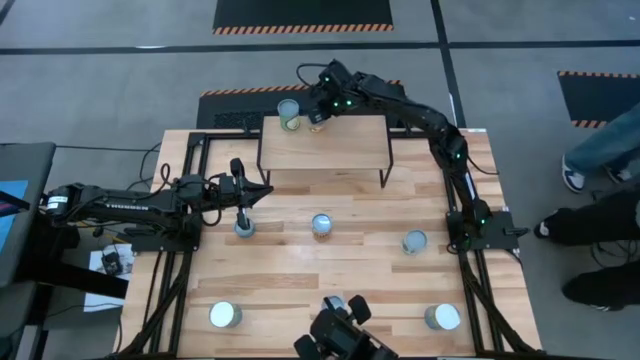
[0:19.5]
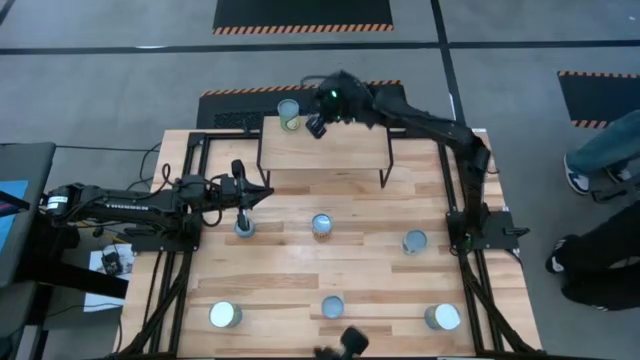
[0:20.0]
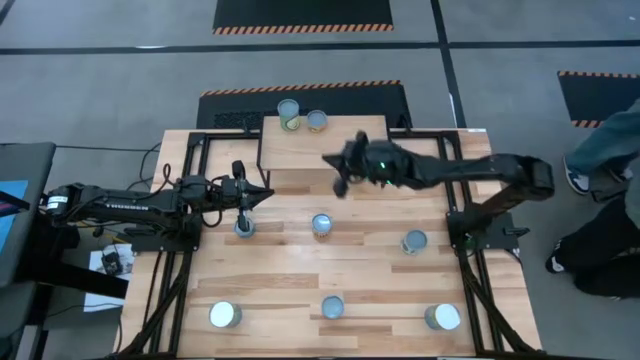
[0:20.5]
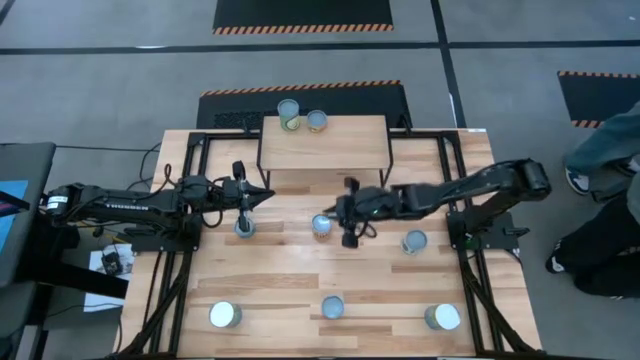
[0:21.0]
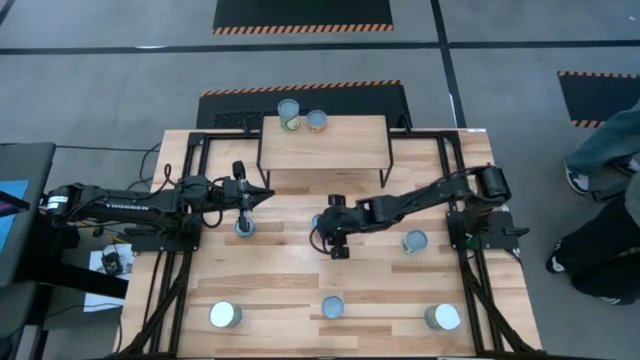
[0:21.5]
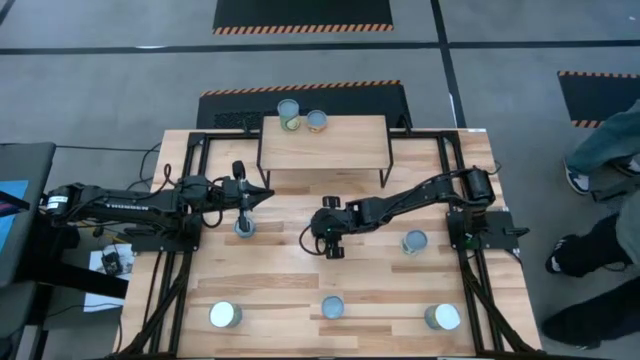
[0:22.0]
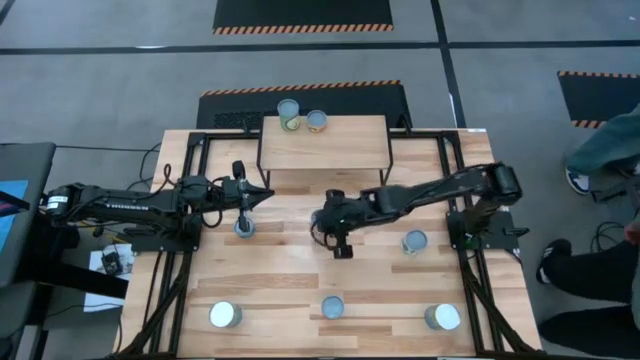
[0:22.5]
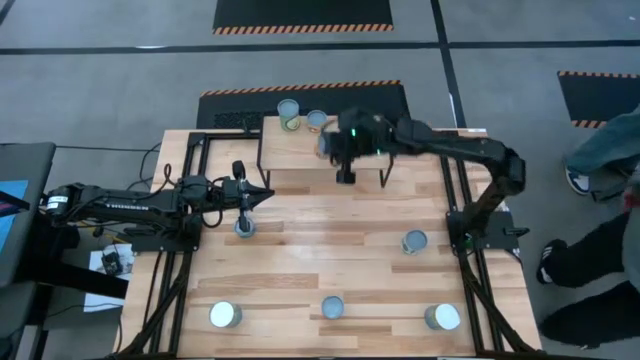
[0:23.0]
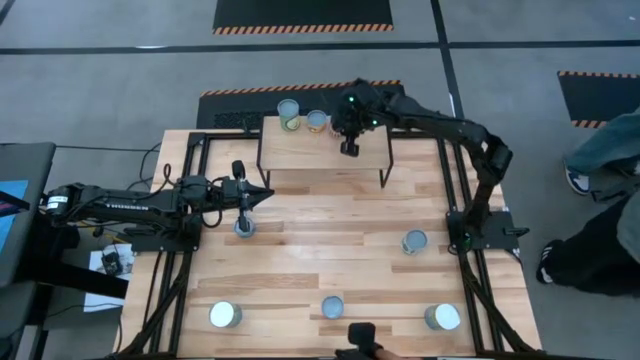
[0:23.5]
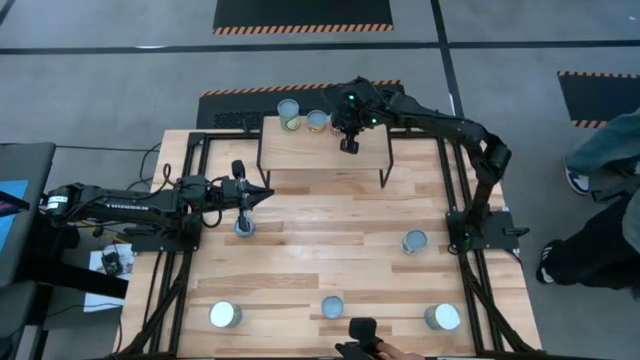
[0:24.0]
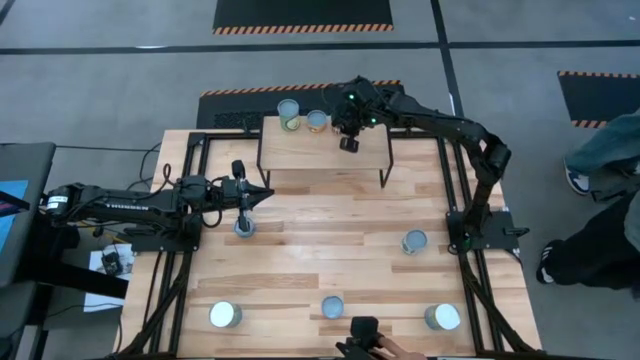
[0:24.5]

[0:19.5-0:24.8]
Task: Pick and place cans onto a shelf
Put the orange Black spicy can on the shelf

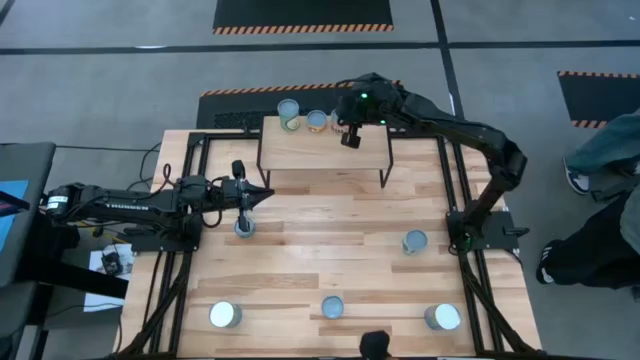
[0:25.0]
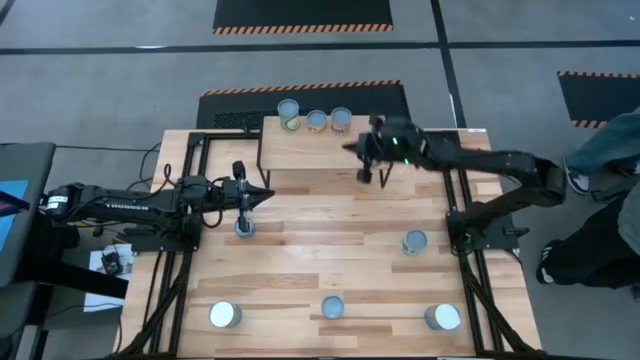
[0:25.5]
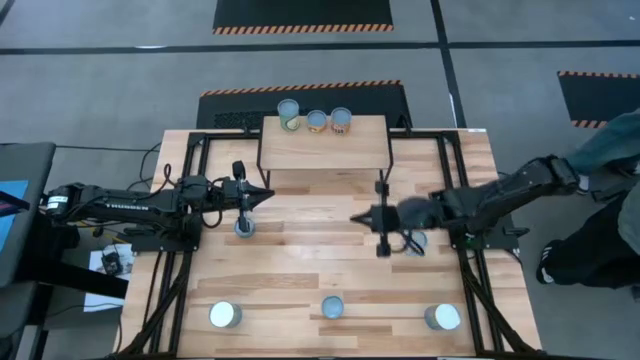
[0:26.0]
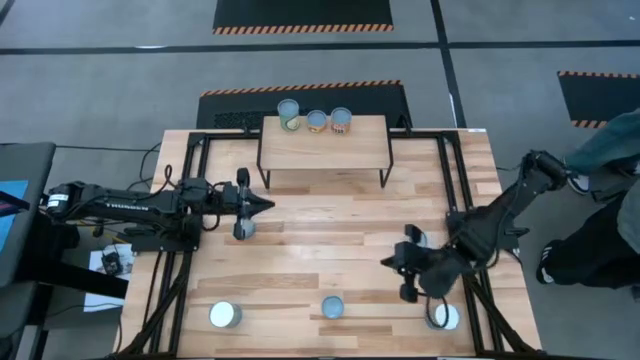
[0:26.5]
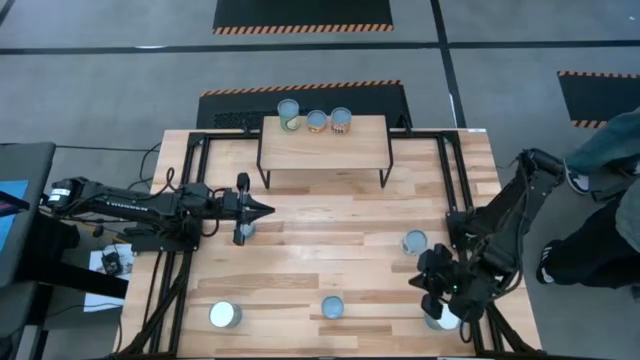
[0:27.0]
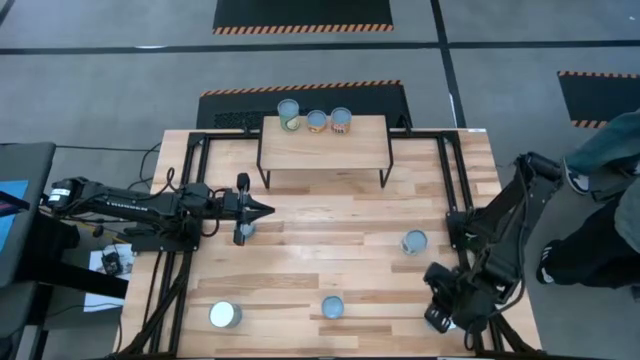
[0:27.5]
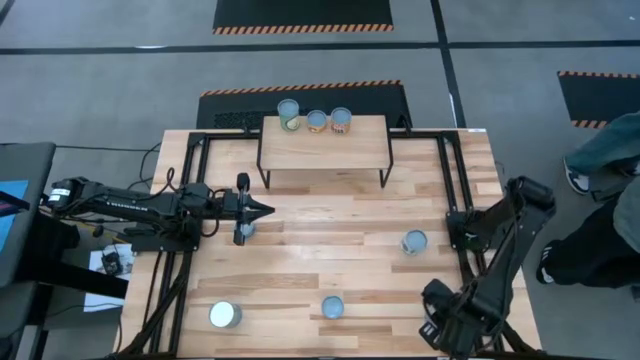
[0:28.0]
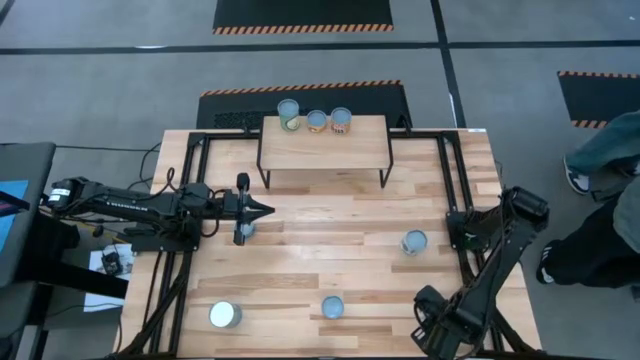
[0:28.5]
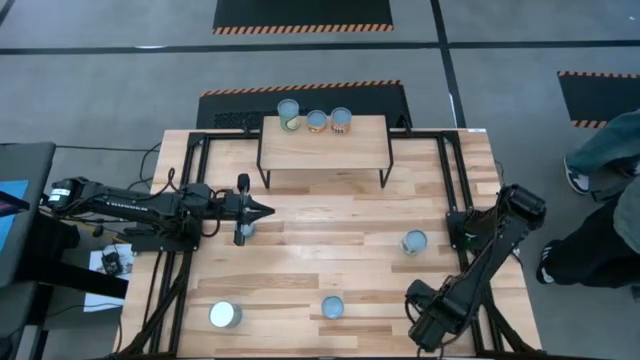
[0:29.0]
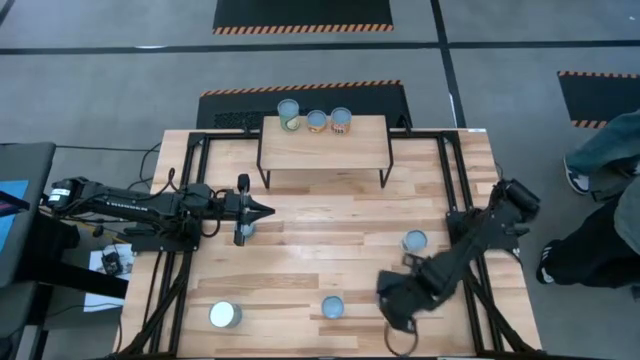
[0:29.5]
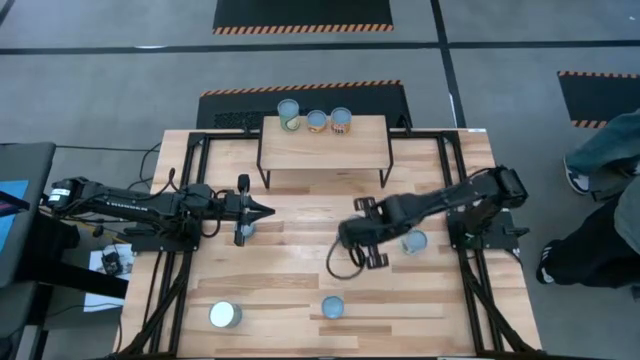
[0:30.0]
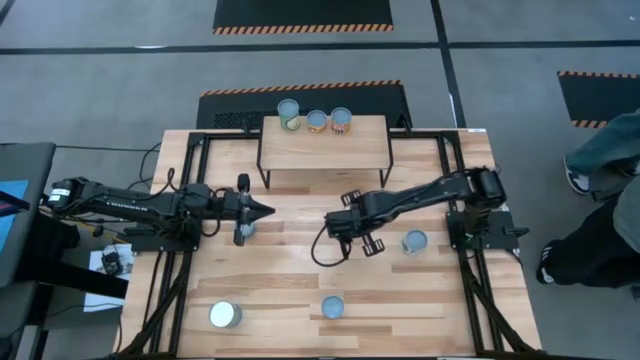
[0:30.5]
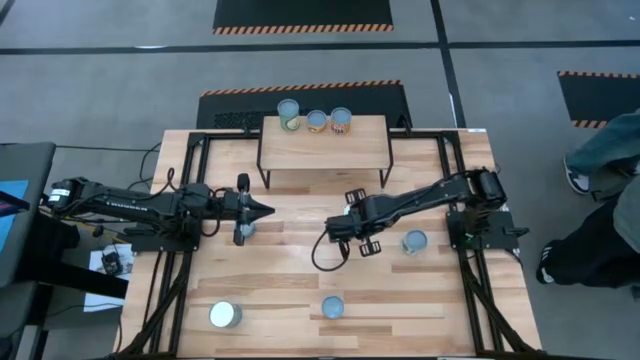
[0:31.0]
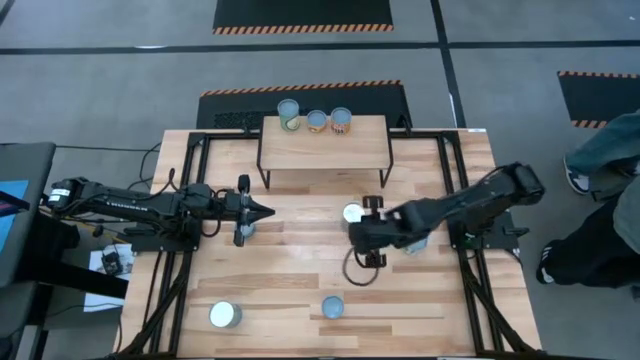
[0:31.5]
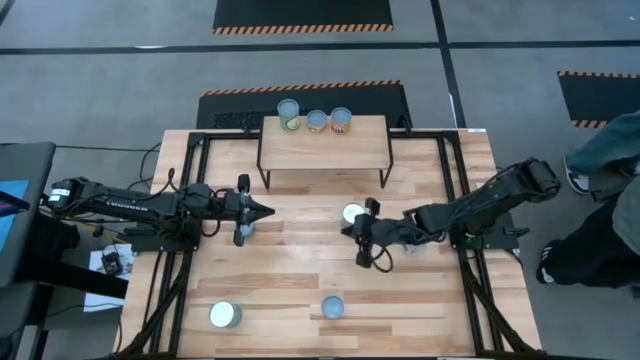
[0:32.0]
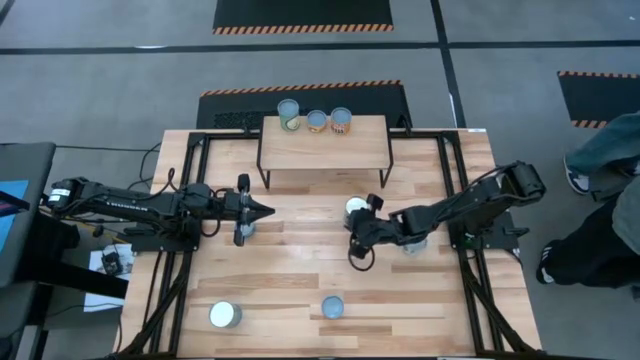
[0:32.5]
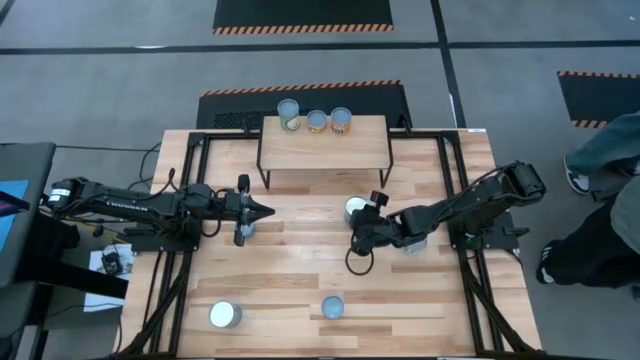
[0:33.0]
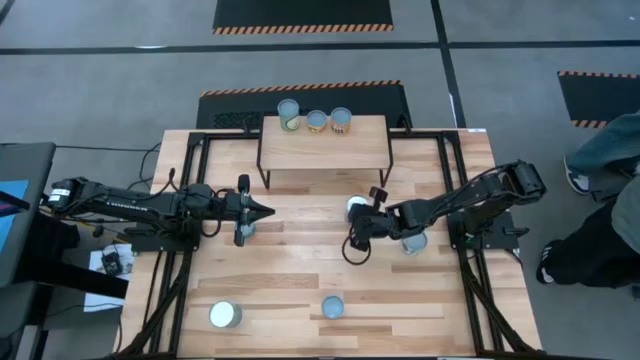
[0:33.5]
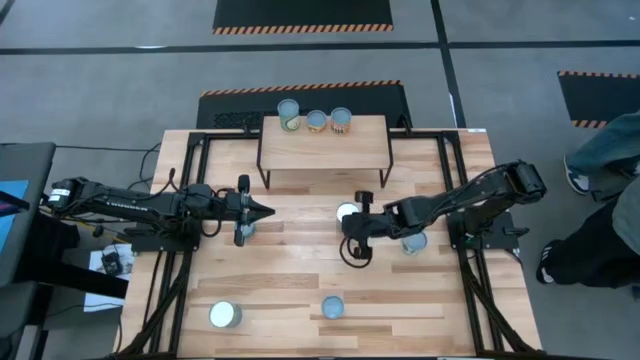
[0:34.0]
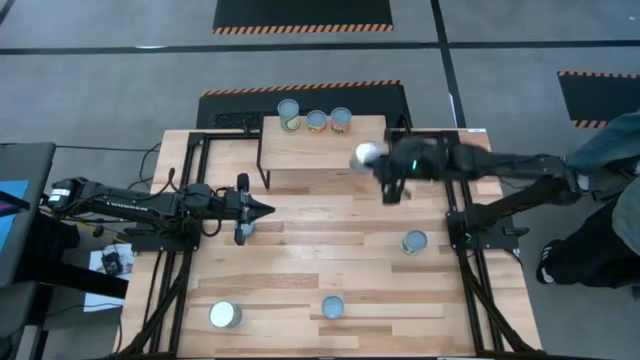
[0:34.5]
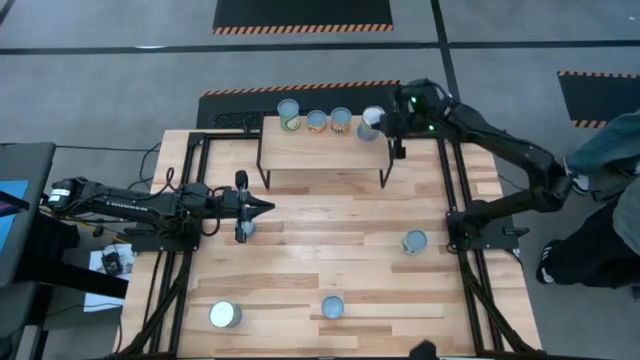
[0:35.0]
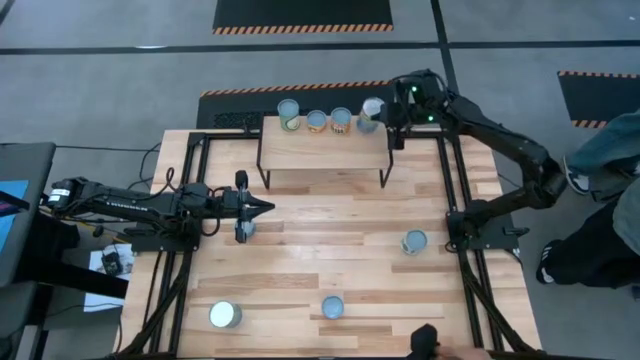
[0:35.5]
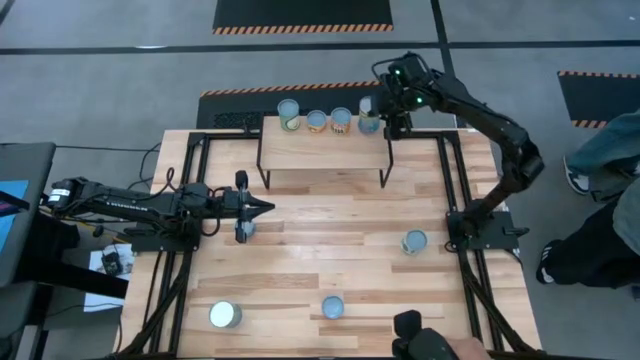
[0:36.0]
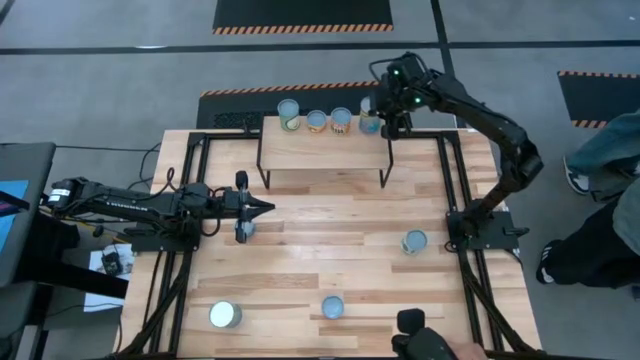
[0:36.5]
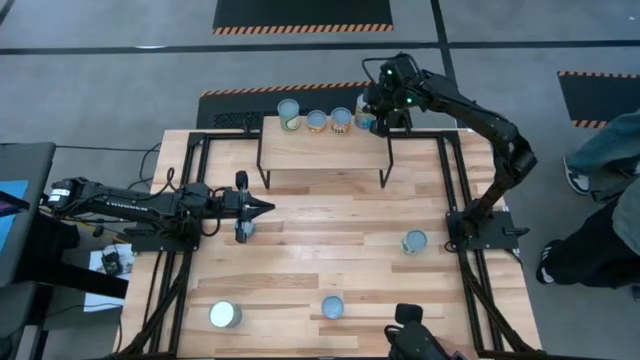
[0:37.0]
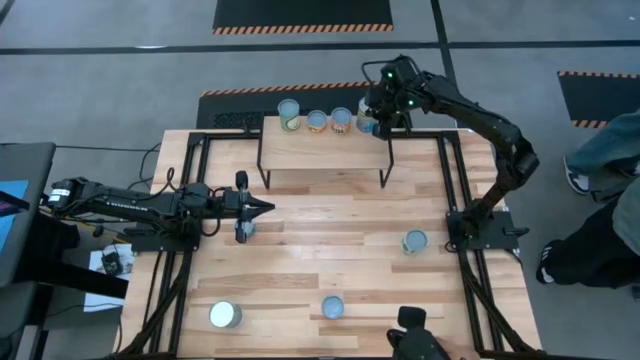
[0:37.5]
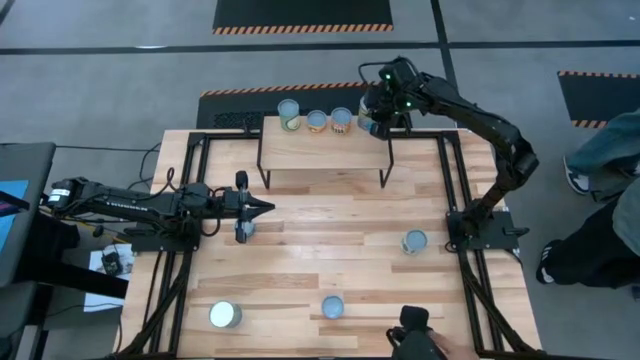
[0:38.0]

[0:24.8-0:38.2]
Put the blue cherries can on the shelf

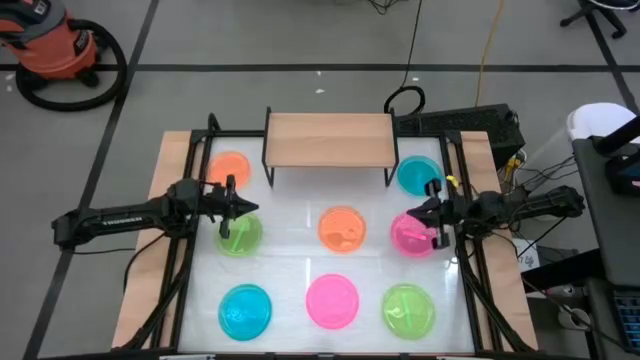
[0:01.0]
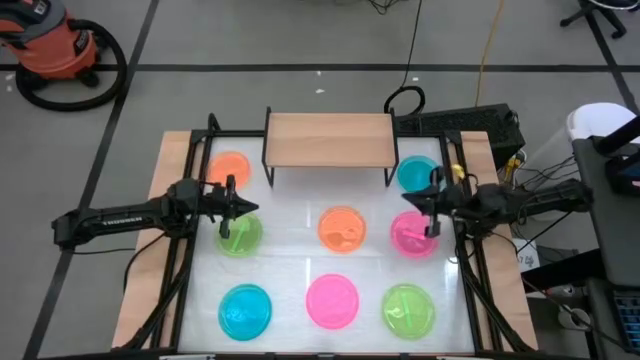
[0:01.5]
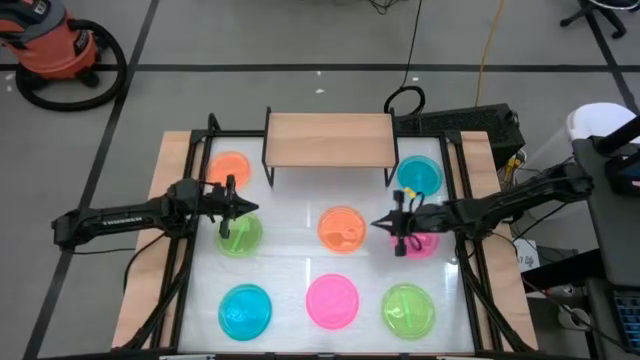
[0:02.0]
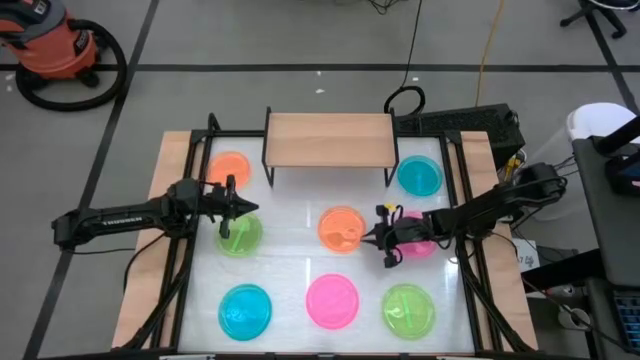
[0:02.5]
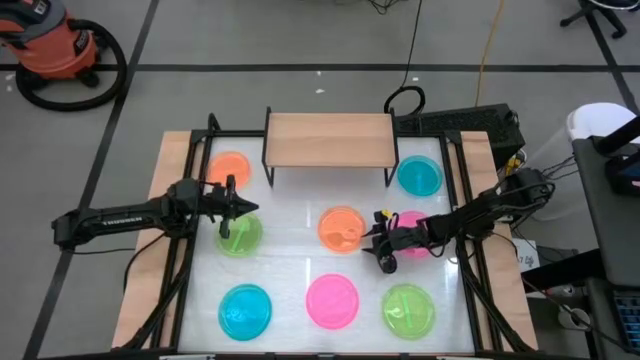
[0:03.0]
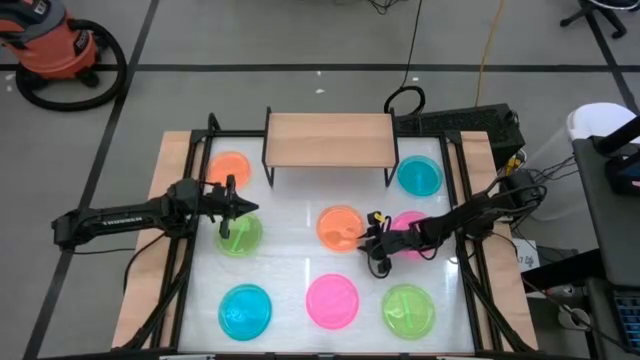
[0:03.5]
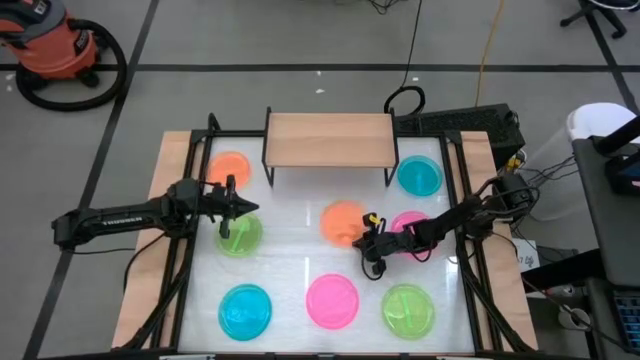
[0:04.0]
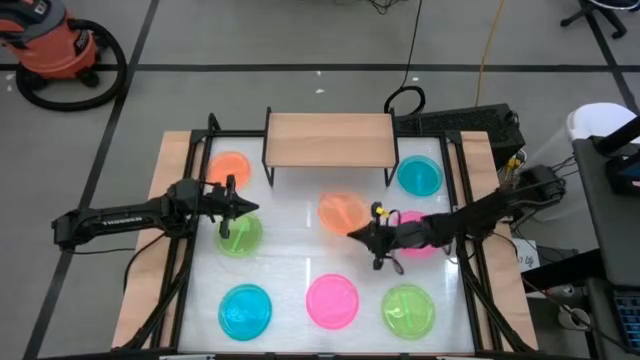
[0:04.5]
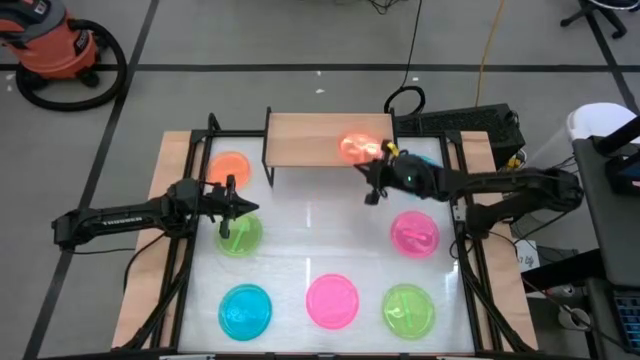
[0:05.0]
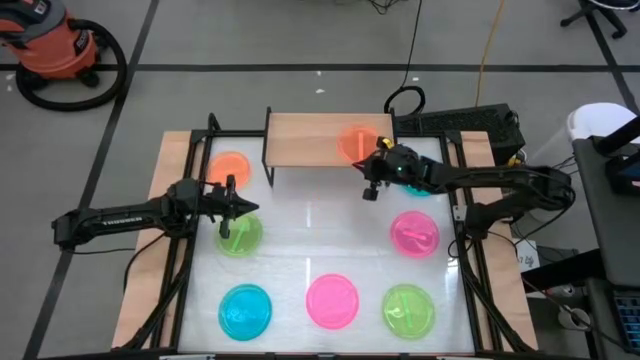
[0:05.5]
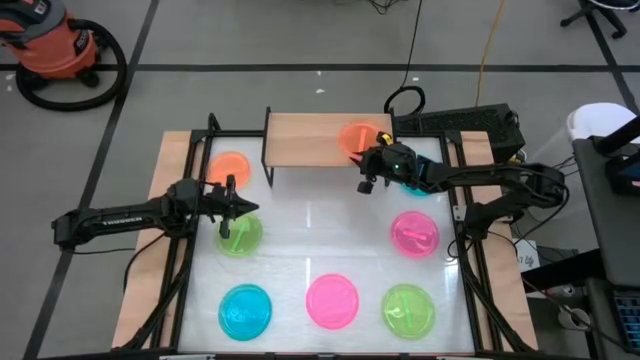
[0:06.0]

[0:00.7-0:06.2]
Task: Place and stack plates onto a shelf
Put the bottom orange plate on the shelf
